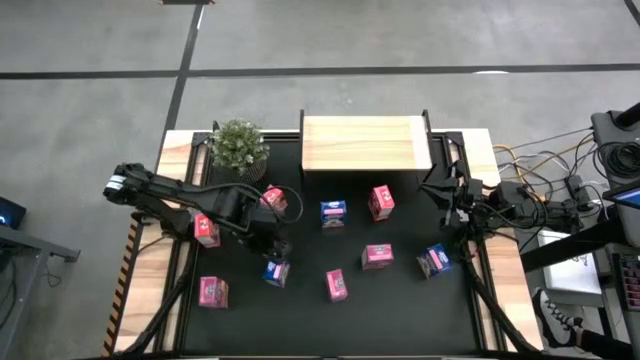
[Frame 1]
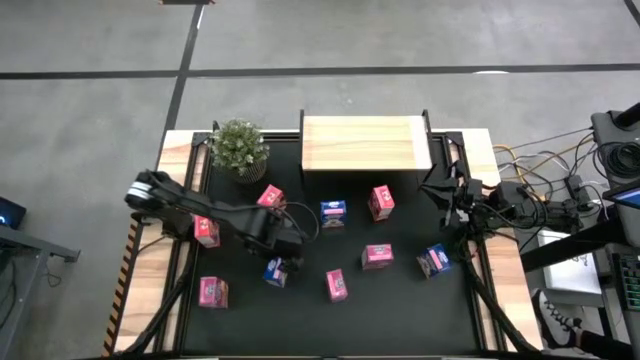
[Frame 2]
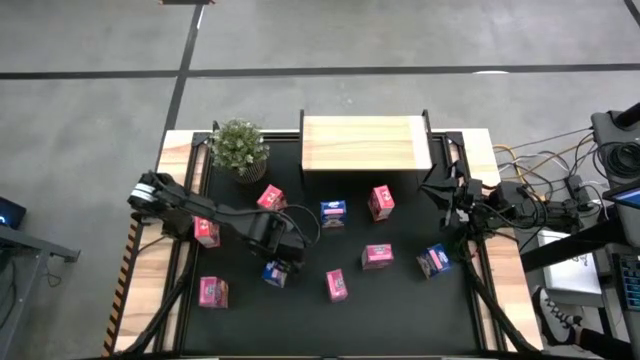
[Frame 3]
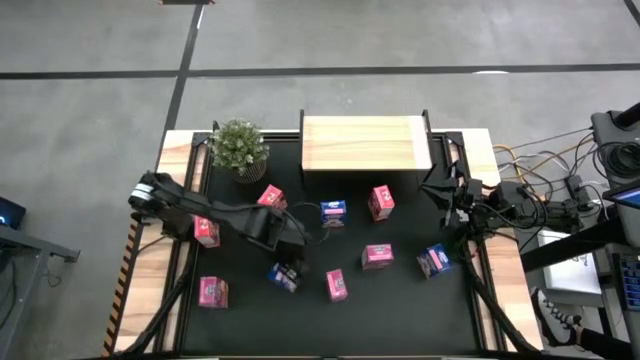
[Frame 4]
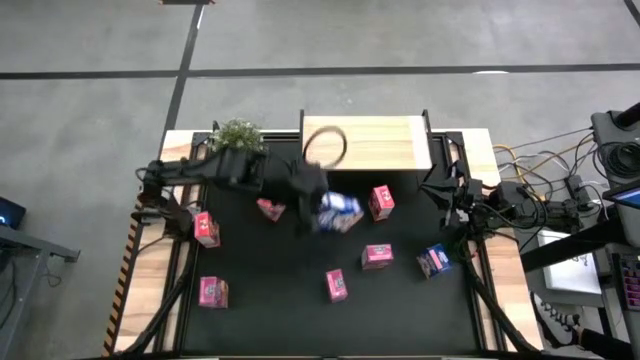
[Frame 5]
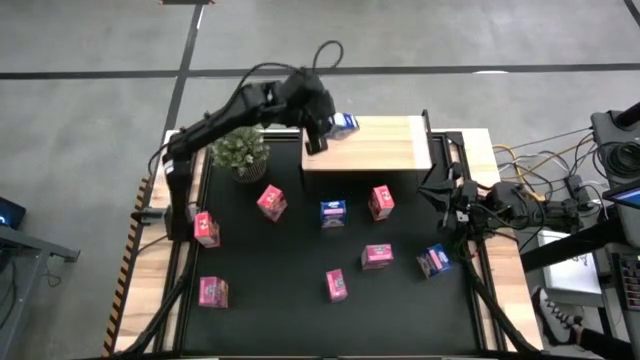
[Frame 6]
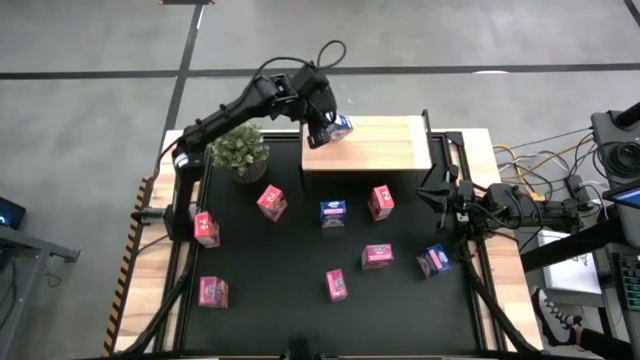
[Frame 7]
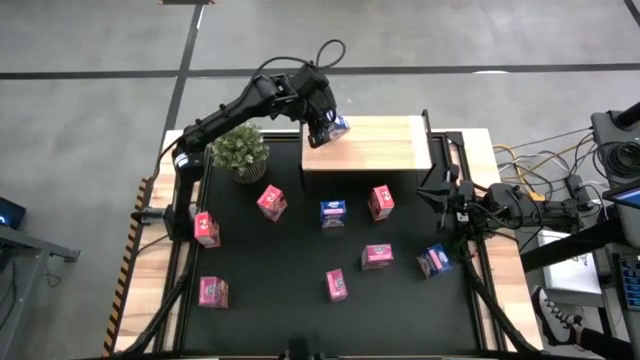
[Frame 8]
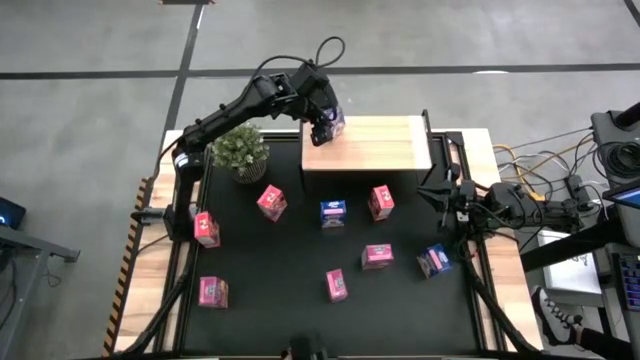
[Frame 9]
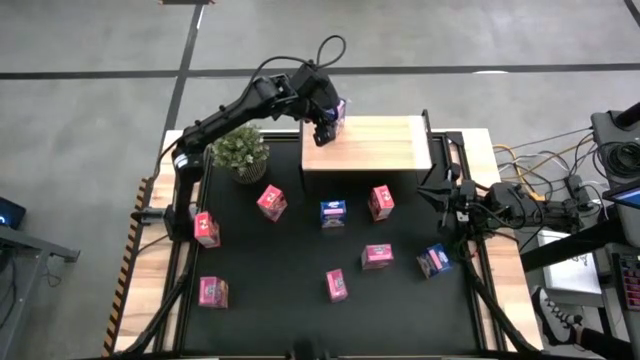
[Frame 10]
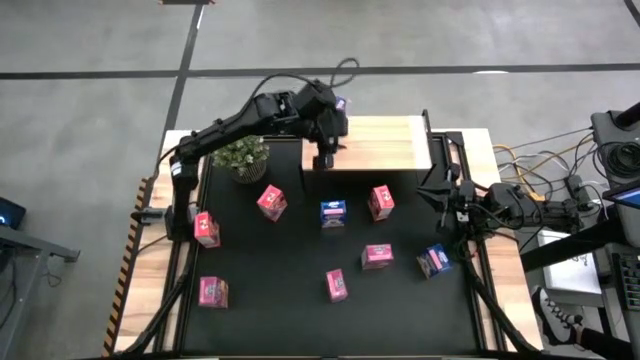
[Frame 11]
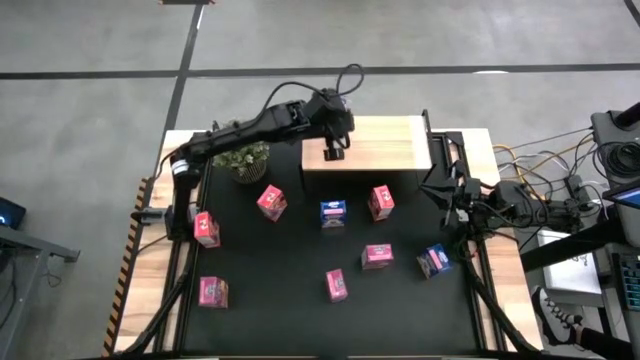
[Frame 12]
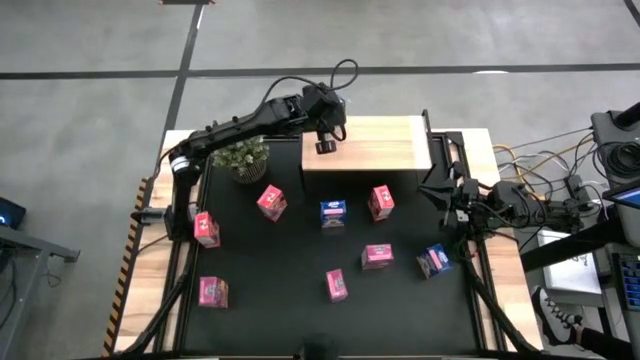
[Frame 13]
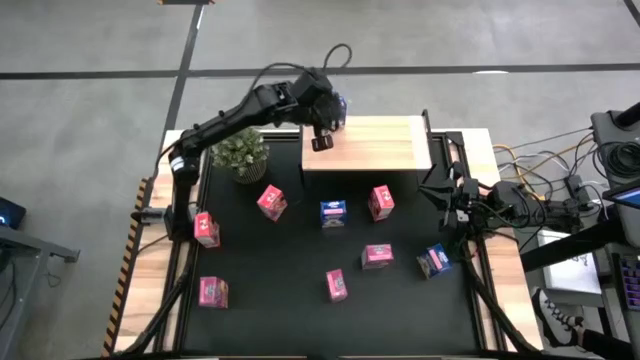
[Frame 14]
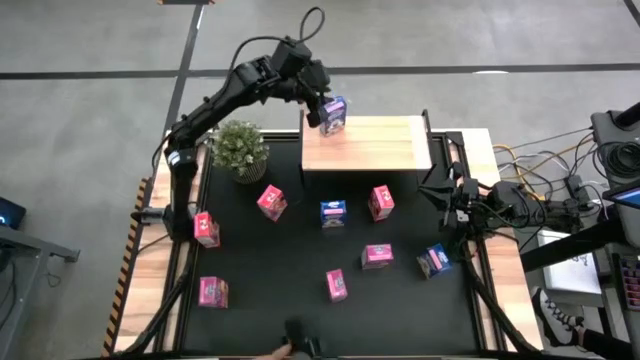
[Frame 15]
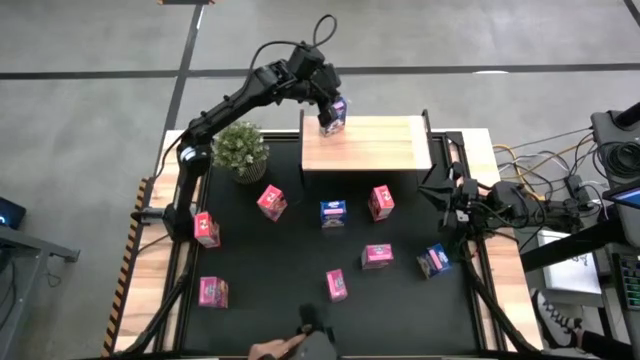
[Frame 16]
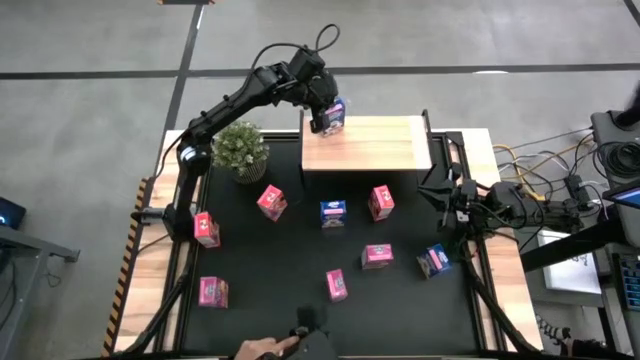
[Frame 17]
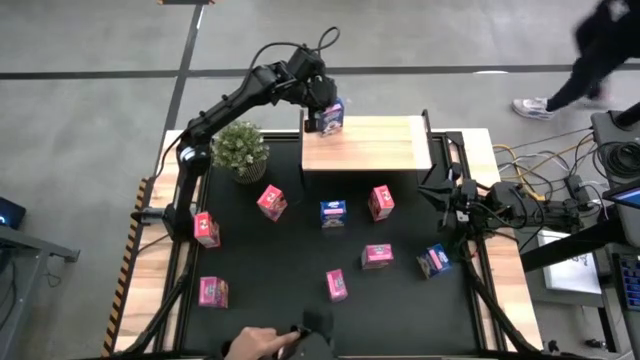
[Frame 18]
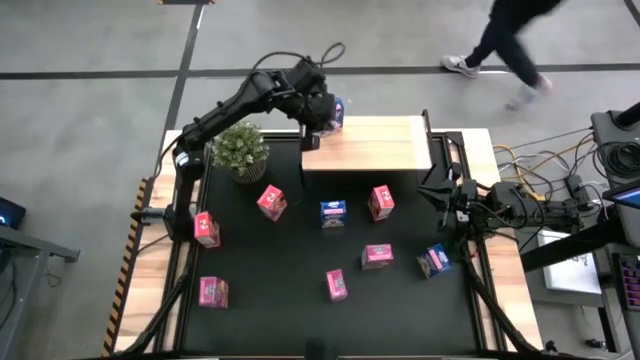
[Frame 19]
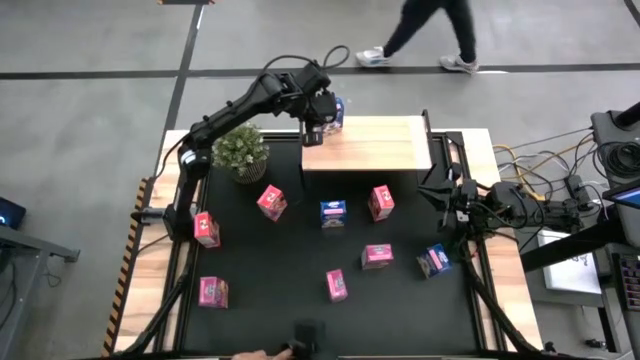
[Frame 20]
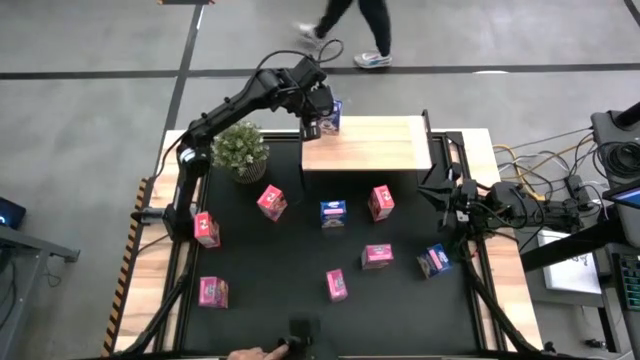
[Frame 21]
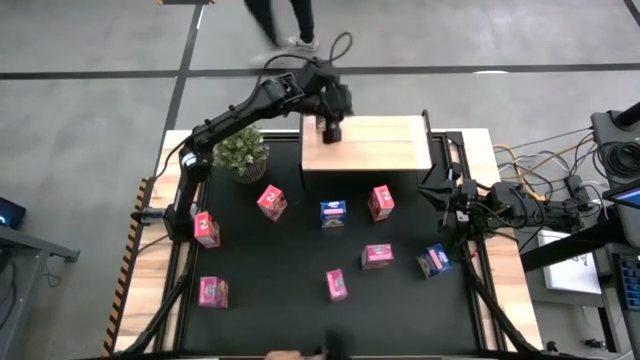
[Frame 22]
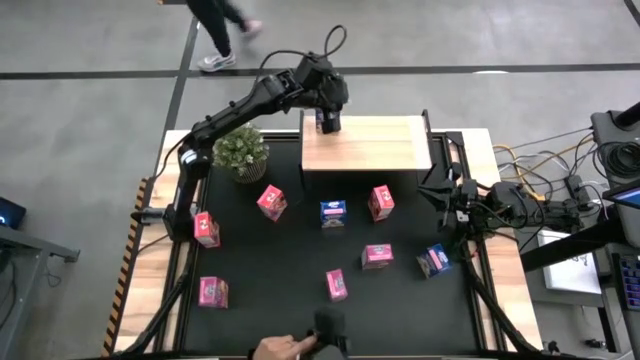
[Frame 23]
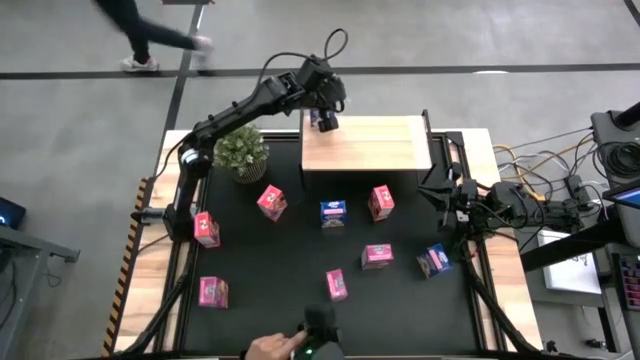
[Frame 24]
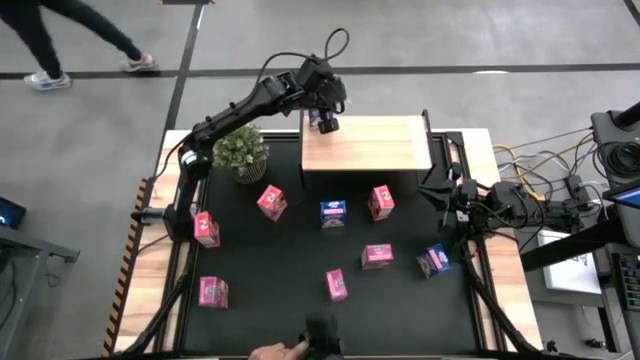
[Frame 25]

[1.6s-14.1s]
Task: Stack cereal on shelf
Put the bottom left blue cereal box on the shelf

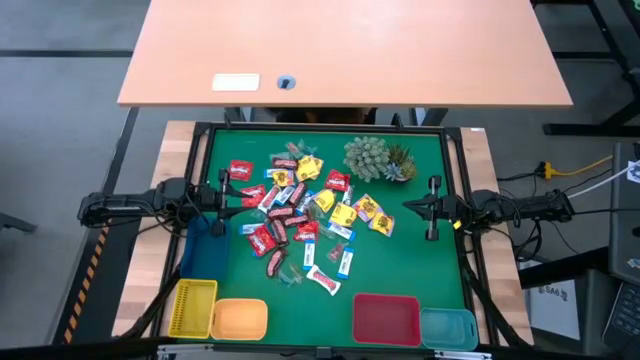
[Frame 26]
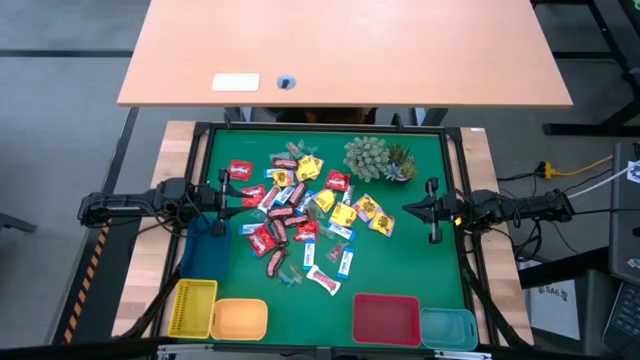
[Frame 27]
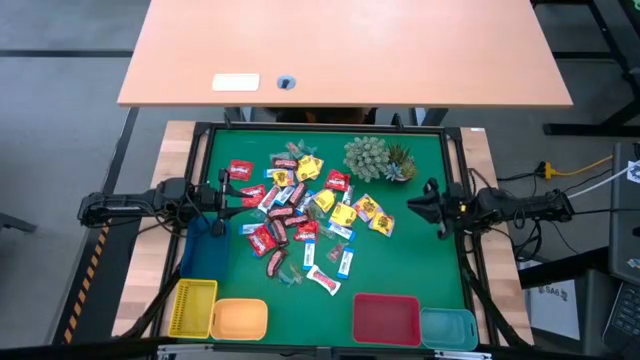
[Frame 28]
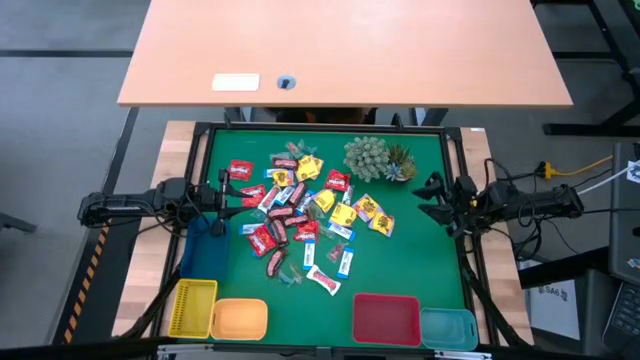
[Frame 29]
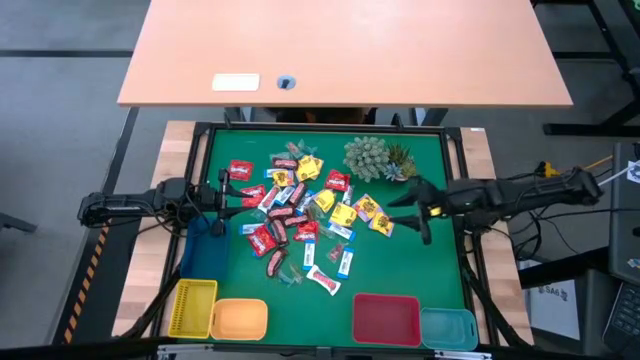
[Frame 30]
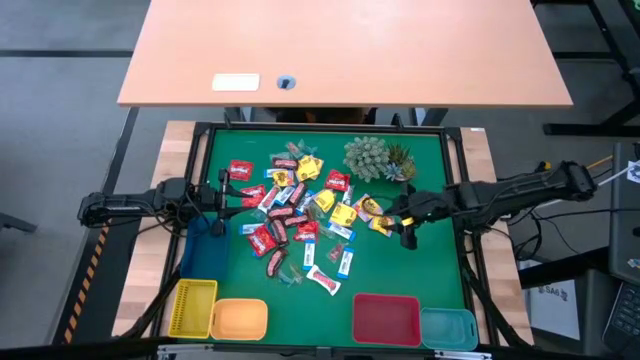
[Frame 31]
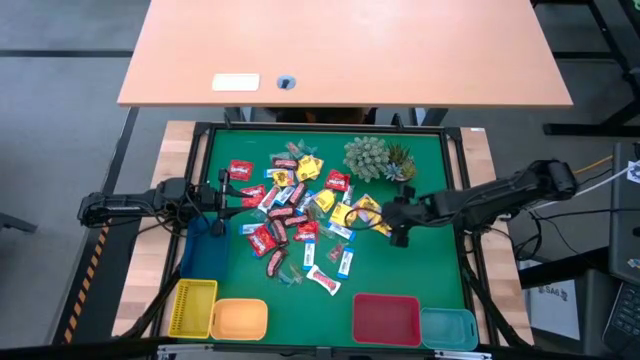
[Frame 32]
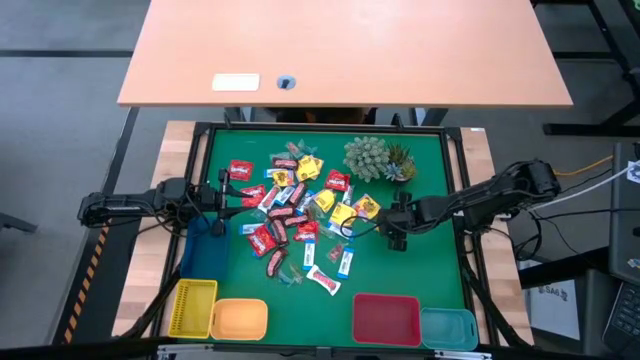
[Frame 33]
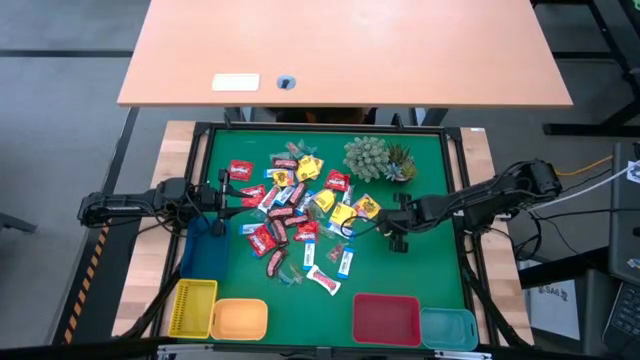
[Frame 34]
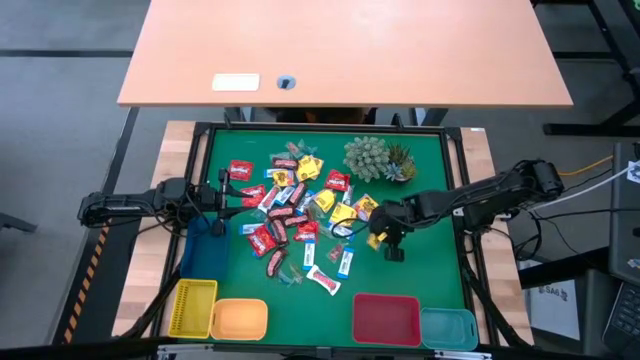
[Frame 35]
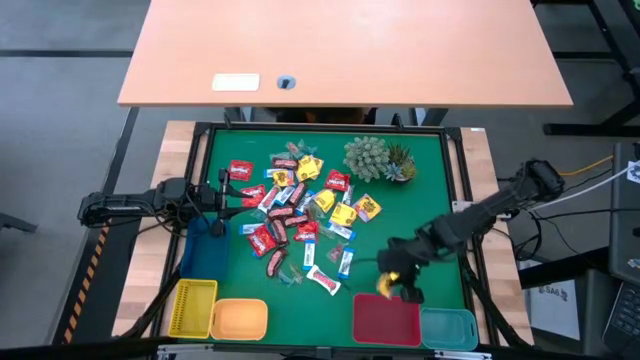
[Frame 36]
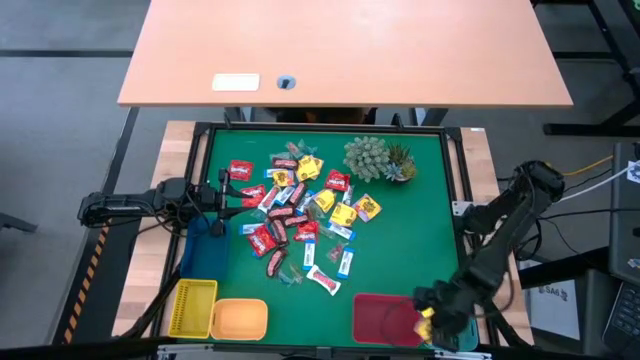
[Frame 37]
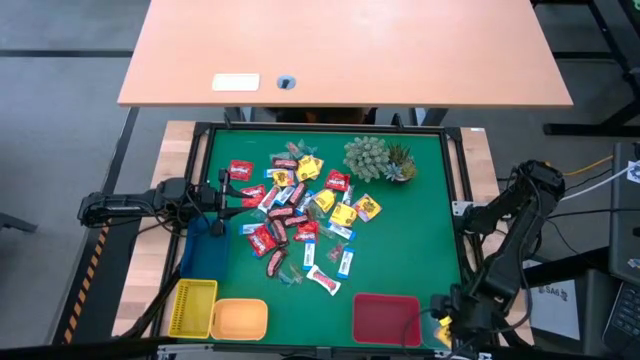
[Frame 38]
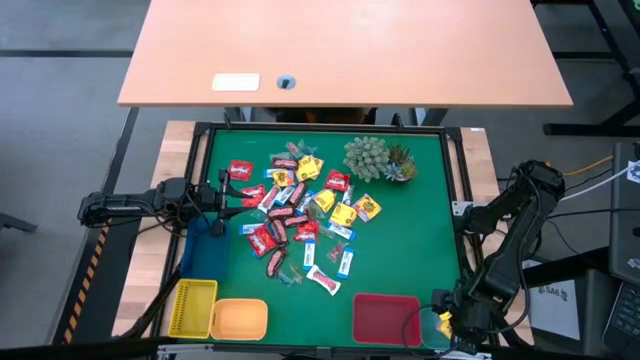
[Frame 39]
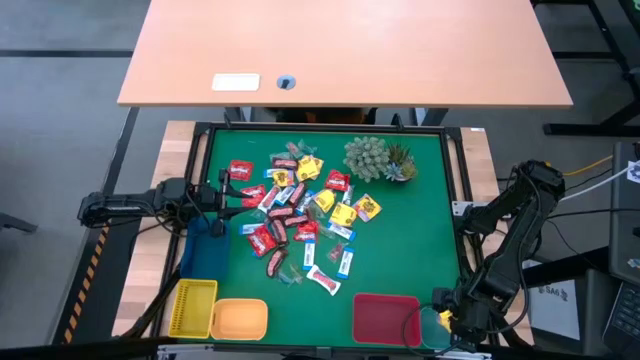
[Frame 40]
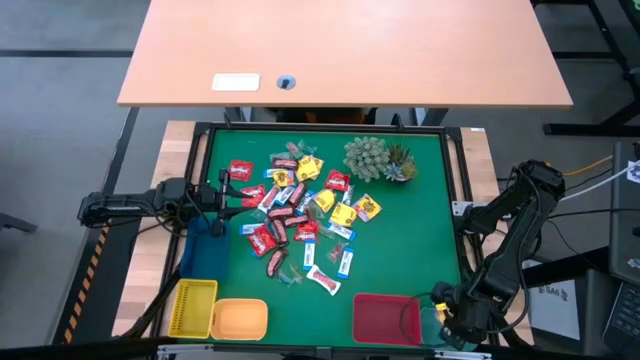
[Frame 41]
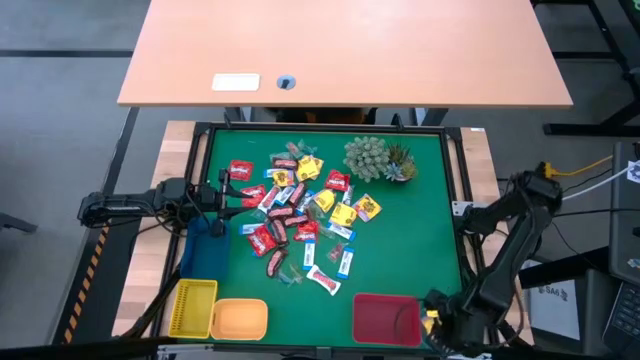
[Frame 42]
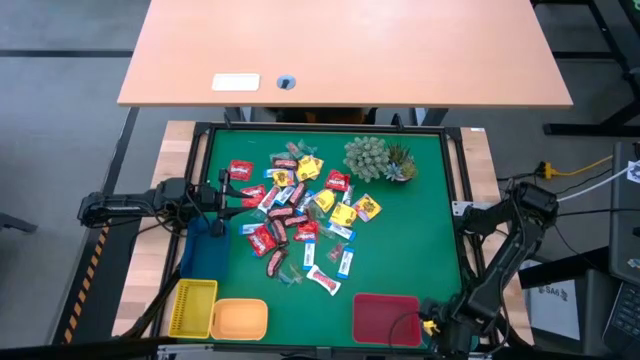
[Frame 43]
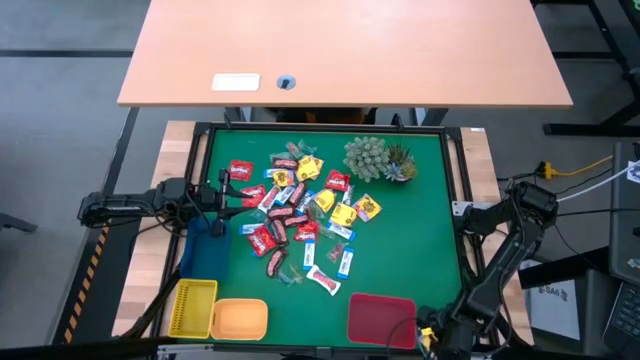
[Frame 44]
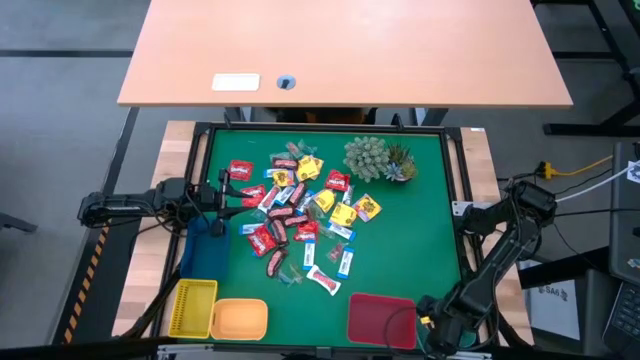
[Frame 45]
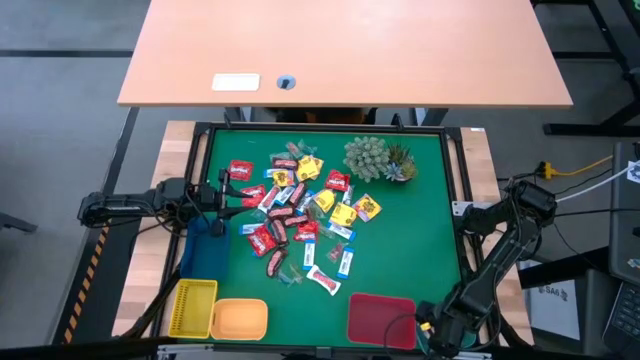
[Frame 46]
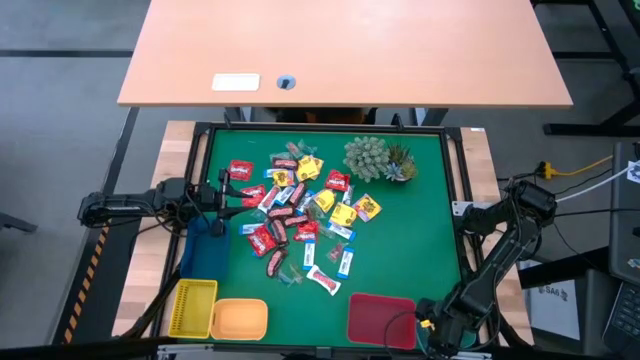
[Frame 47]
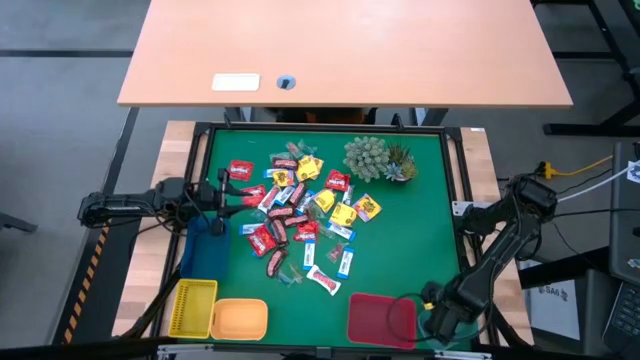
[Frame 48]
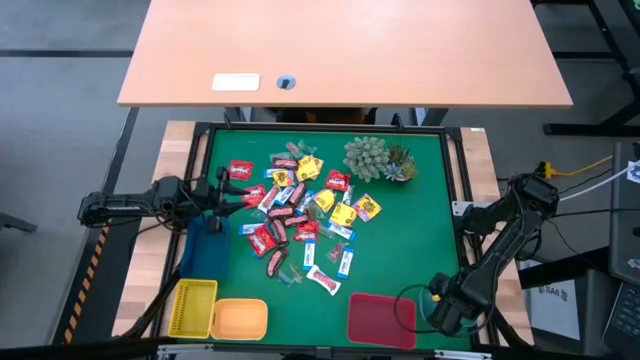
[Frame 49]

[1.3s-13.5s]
Task: Sort candy
Put the yellow candy into the green bin
